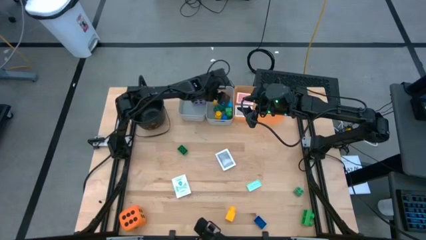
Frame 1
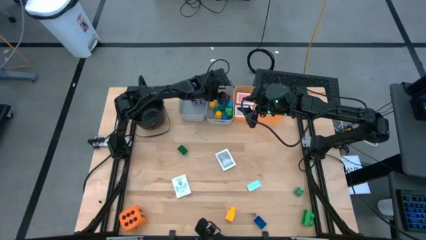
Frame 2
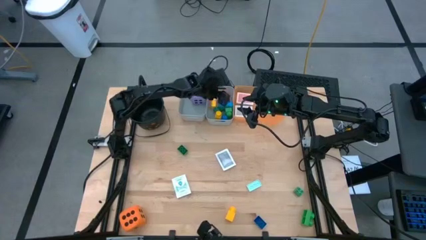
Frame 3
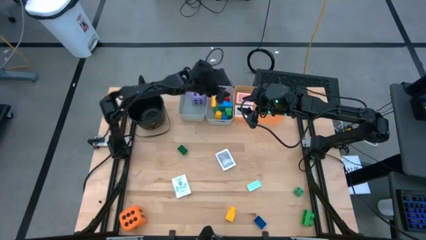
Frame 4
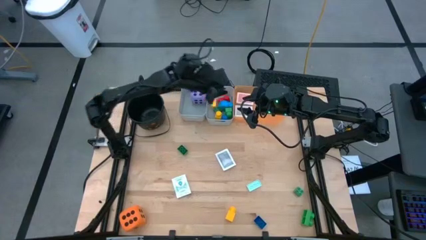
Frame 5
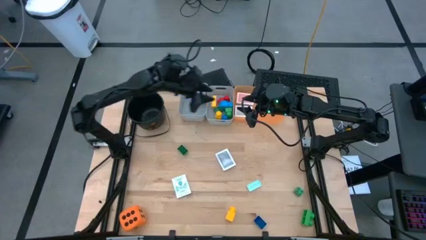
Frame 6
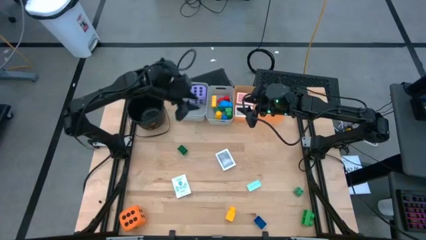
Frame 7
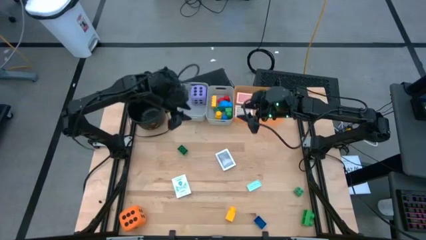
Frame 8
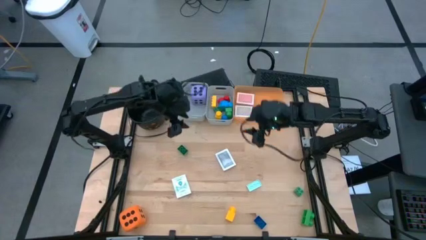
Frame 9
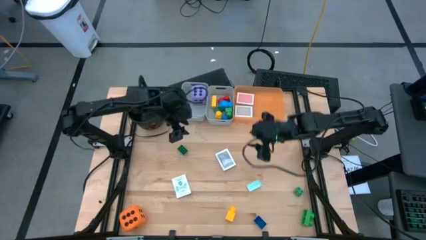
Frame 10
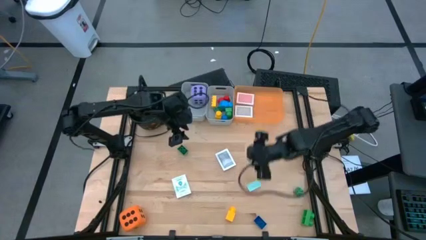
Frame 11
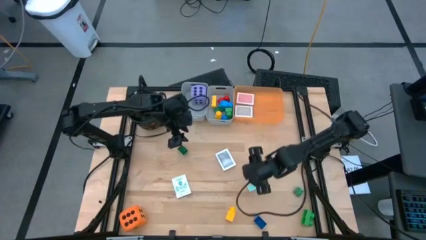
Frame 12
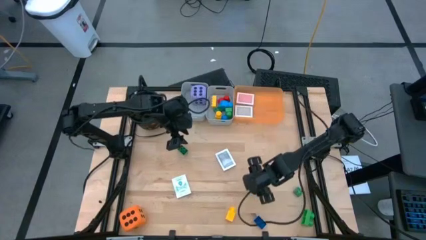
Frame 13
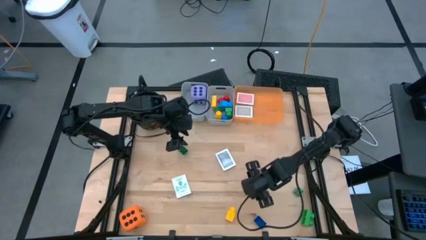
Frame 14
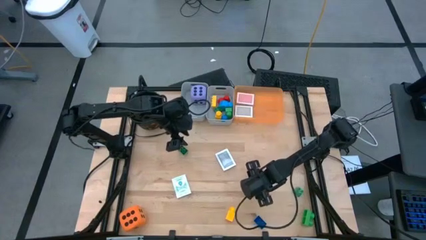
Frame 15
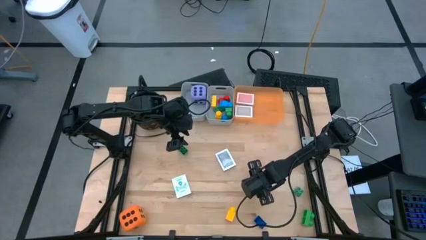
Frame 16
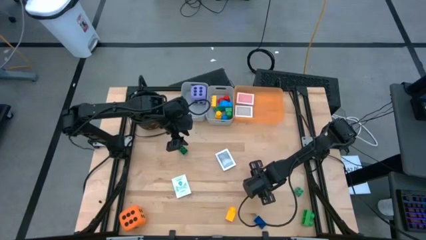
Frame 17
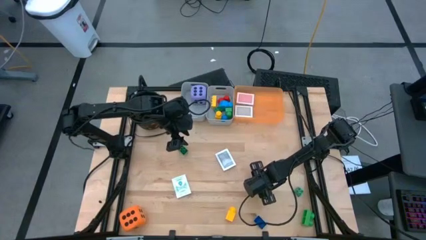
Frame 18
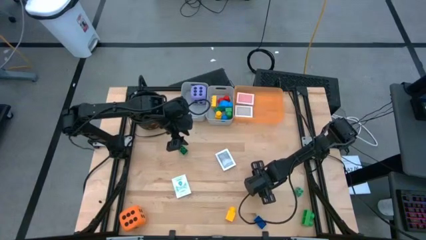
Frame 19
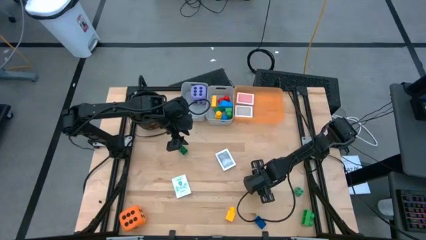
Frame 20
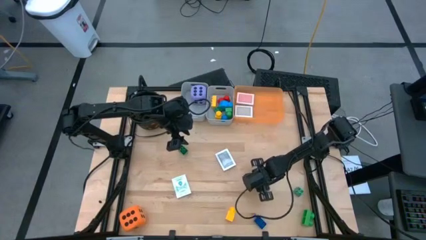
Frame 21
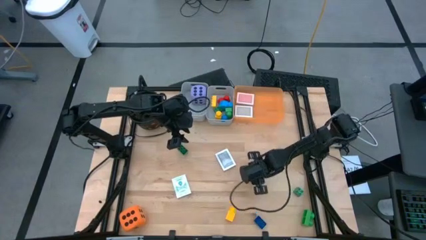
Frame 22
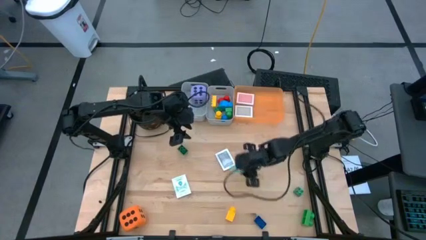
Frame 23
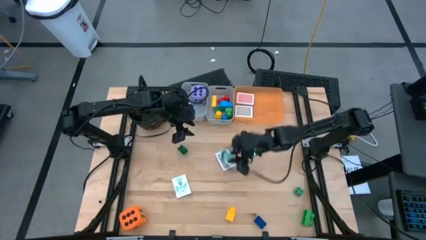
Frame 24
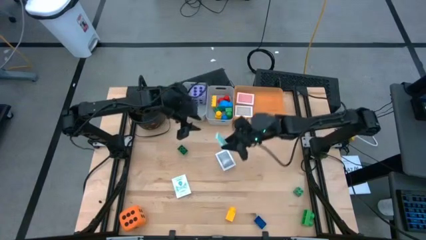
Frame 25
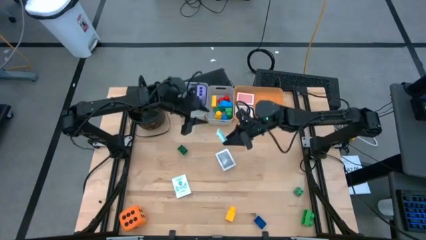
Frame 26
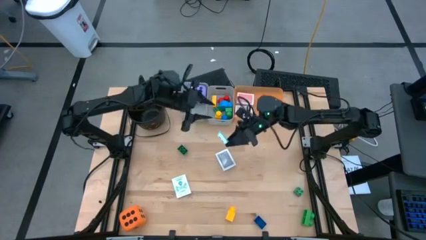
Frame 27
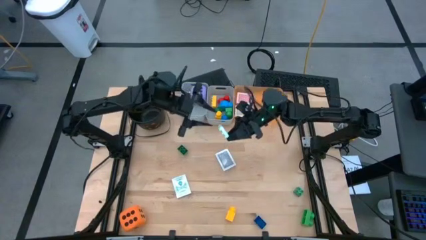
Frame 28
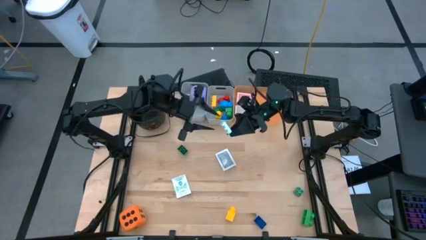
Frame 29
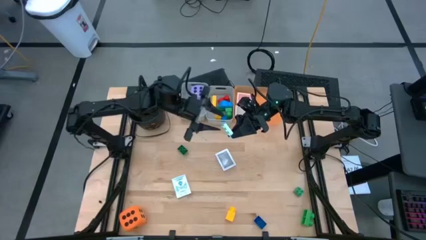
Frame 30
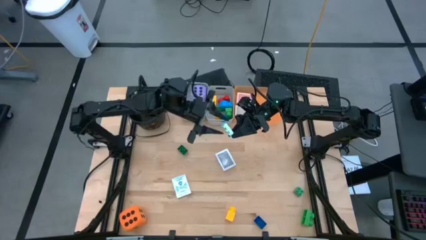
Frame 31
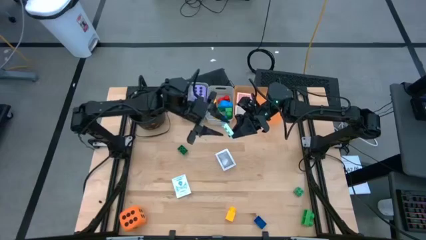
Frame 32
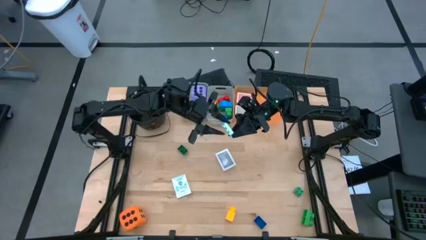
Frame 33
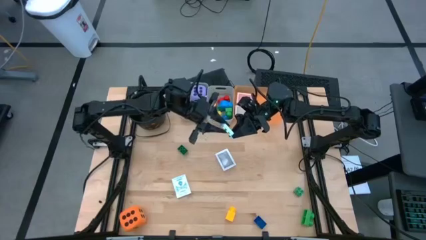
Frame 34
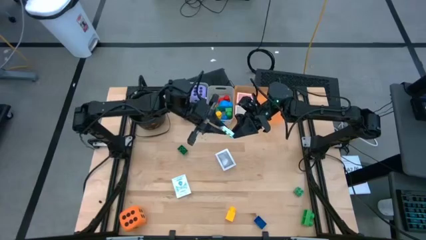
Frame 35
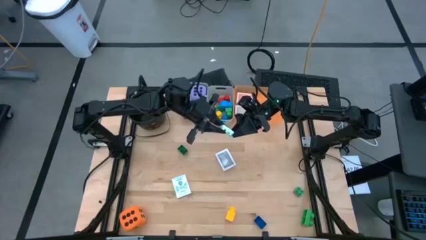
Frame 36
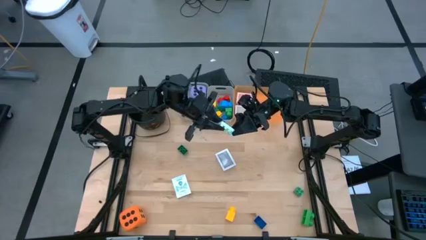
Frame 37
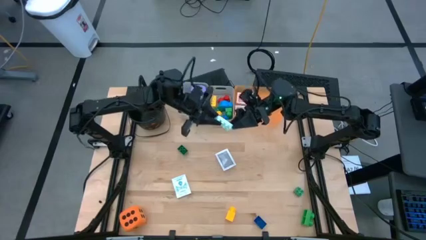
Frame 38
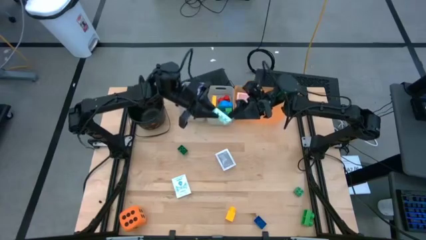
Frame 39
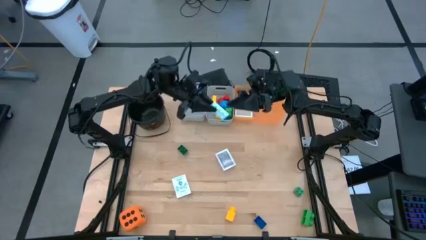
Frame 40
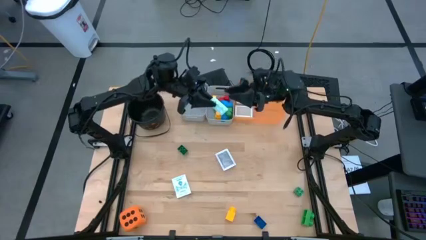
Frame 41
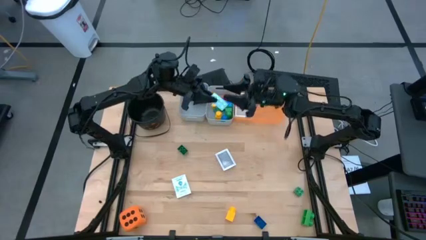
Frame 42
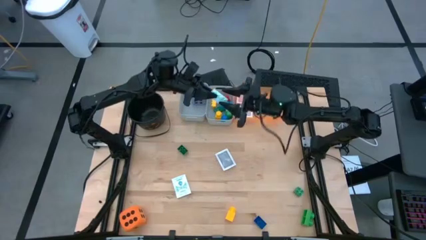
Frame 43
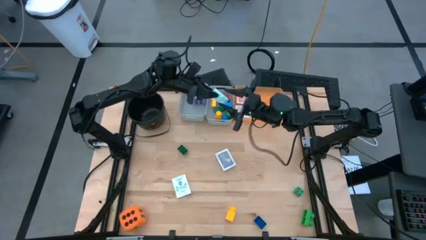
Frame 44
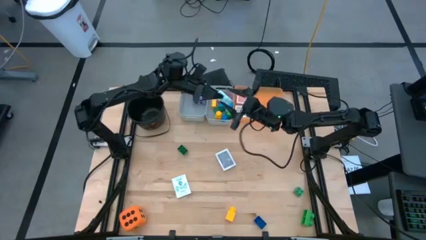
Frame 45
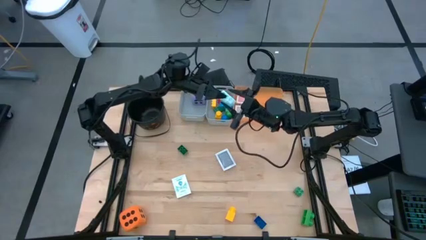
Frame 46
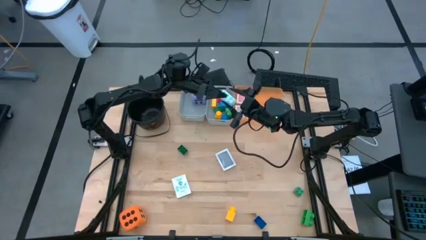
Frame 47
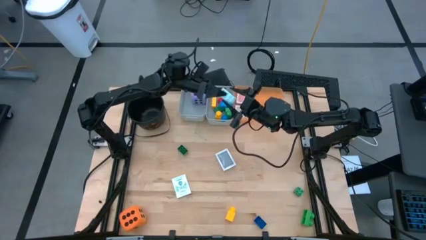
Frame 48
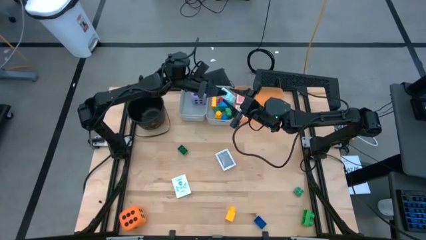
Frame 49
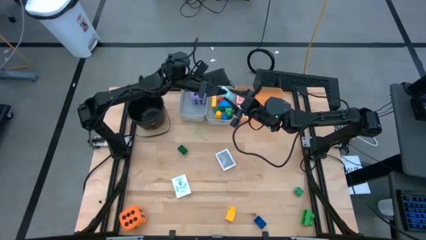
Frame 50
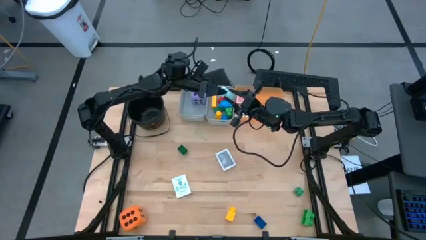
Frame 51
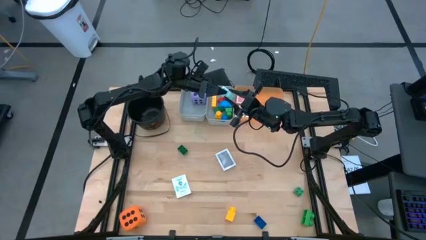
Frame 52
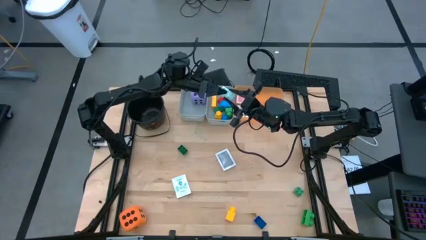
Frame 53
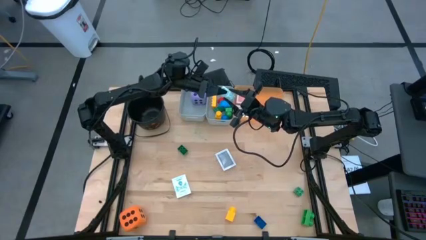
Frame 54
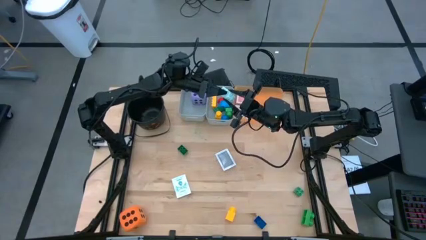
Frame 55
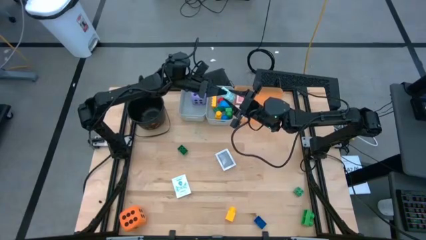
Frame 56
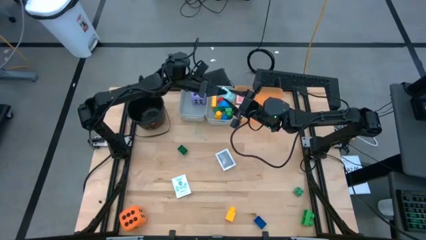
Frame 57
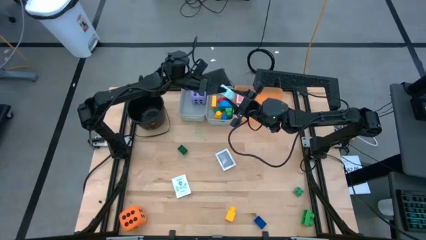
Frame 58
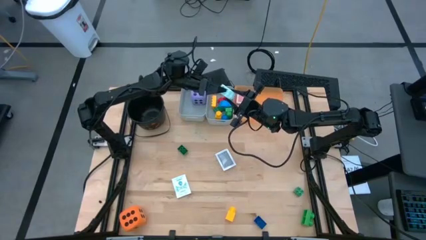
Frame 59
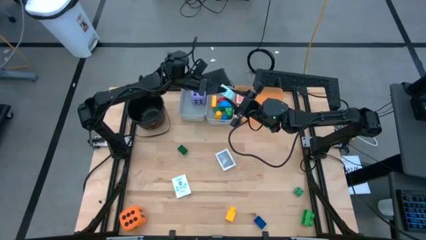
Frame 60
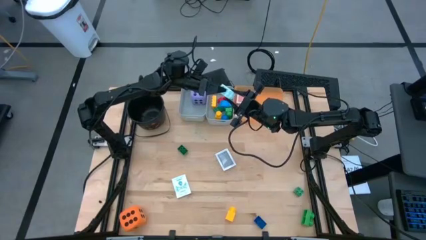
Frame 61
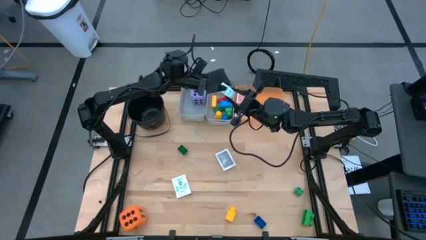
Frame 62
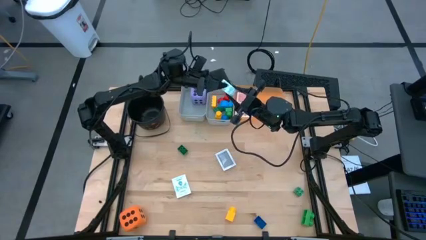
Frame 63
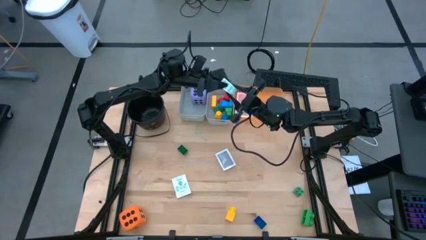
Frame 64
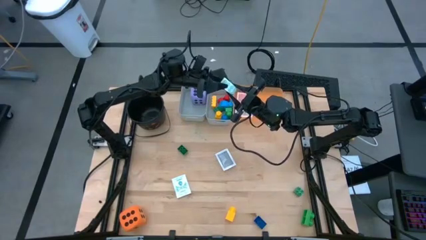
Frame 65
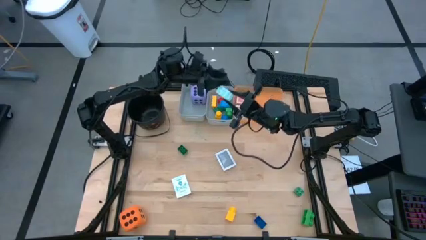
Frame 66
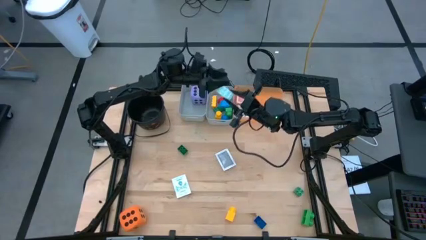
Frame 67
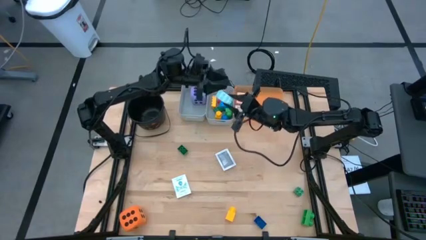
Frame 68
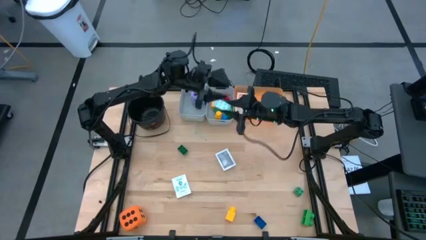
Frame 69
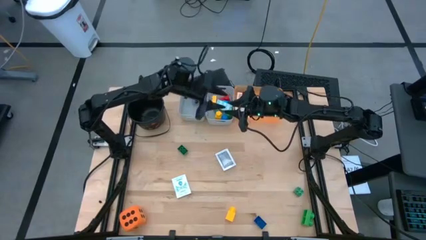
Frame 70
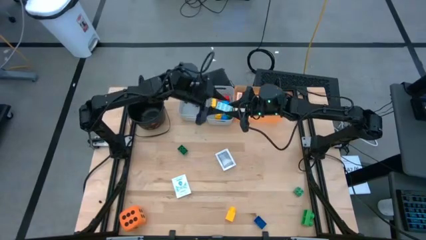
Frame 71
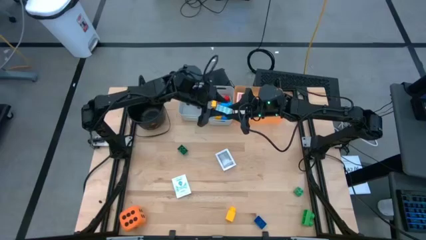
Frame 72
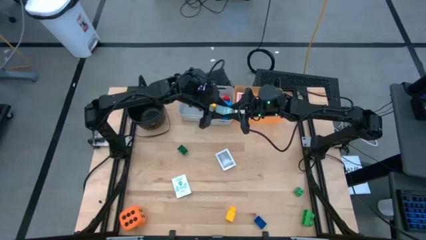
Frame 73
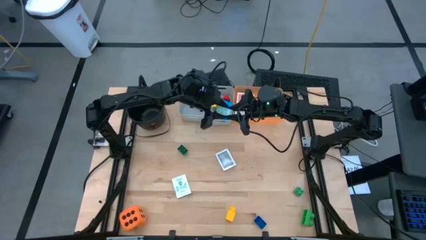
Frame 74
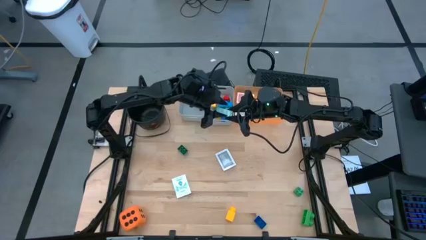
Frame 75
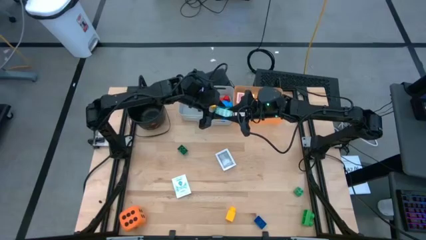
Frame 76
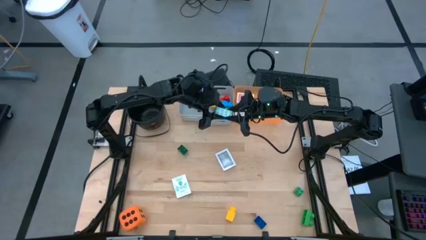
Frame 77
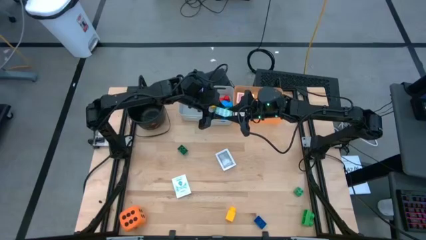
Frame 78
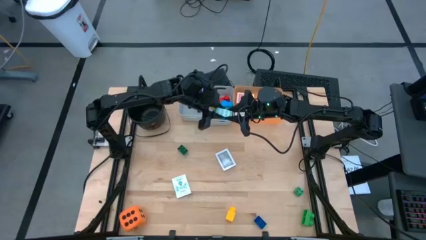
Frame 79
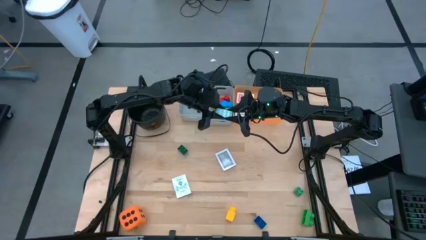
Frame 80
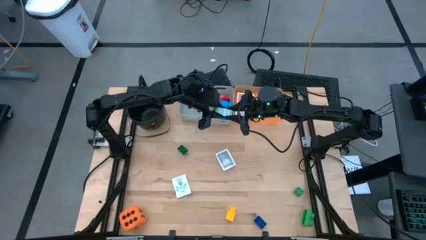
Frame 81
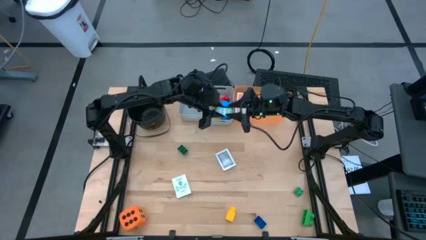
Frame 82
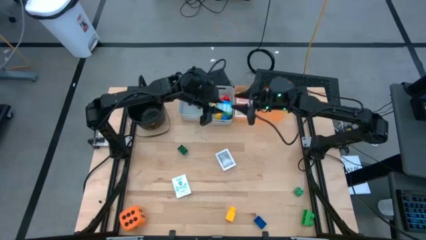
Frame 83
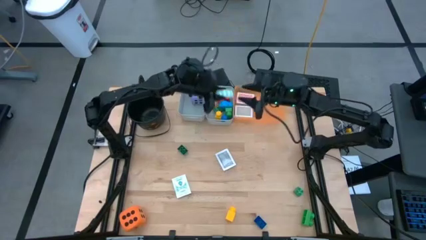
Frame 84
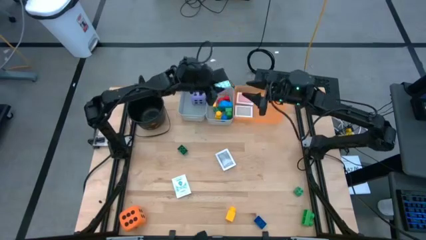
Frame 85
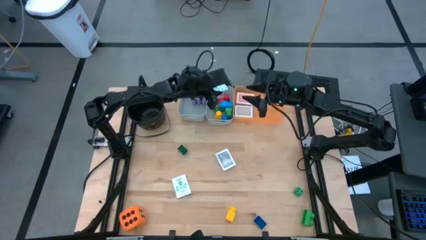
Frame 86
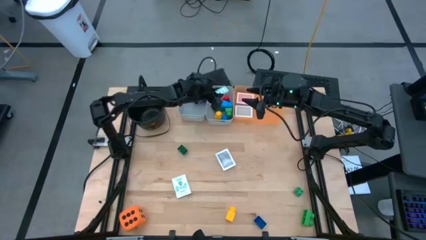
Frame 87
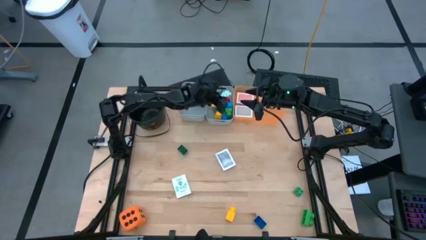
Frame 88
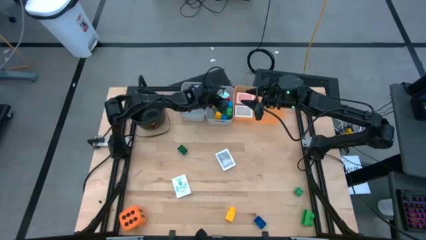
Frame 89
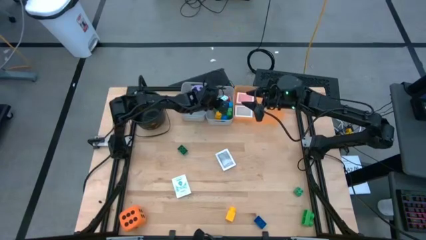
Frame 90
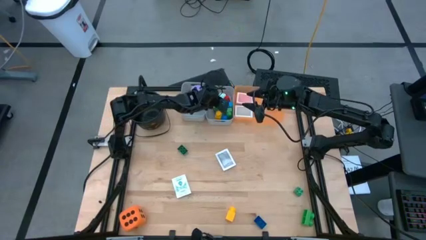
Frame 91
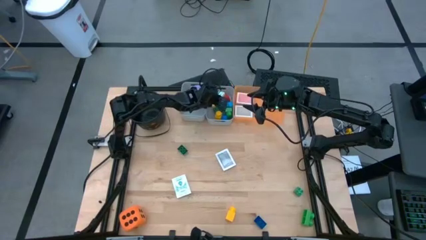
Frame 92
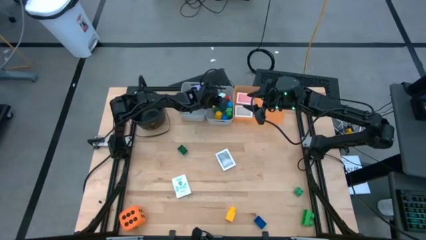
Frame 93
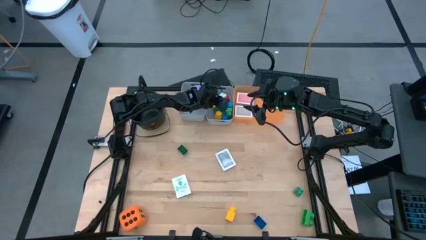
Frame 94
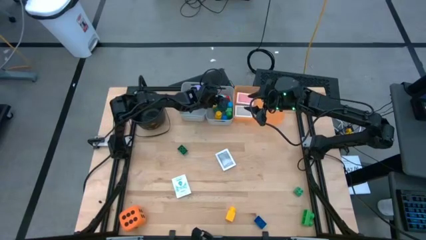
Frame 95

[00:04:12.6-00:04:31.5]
Task: Pick & Place Toys
Put the light blue gamepiece into the right gray bin
